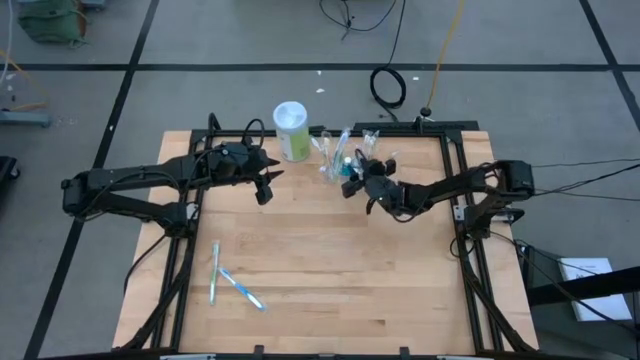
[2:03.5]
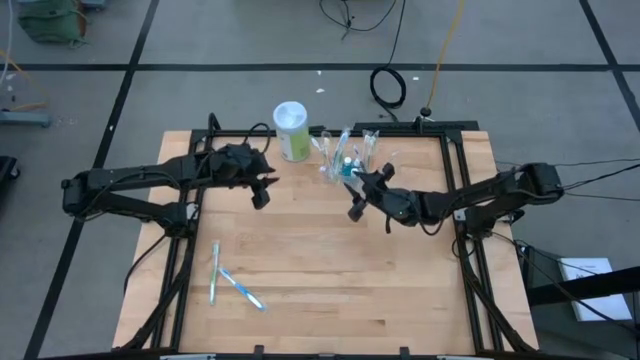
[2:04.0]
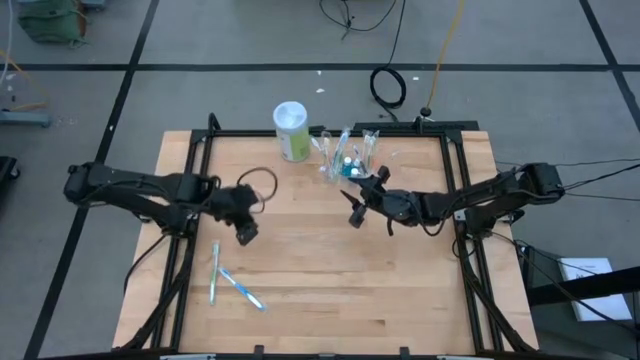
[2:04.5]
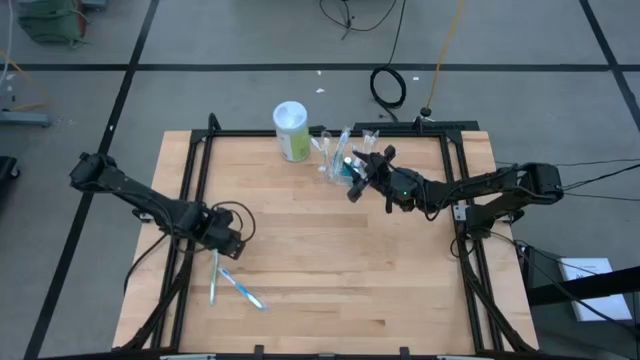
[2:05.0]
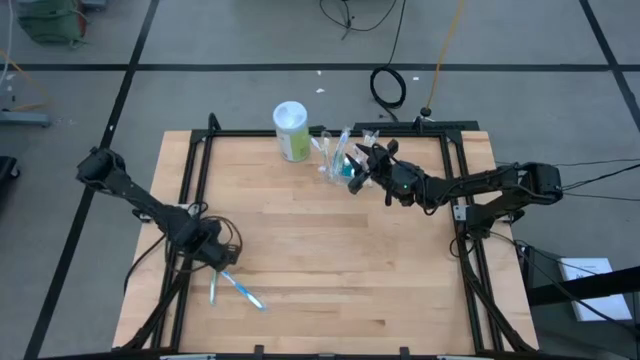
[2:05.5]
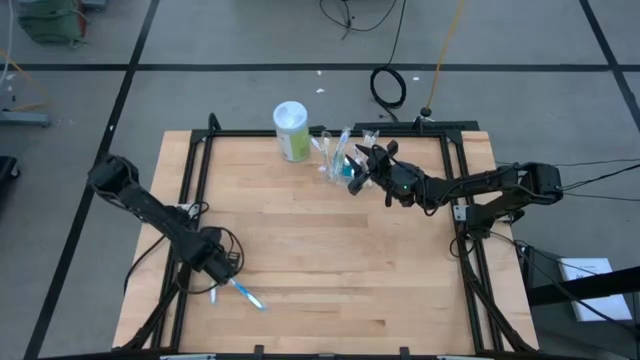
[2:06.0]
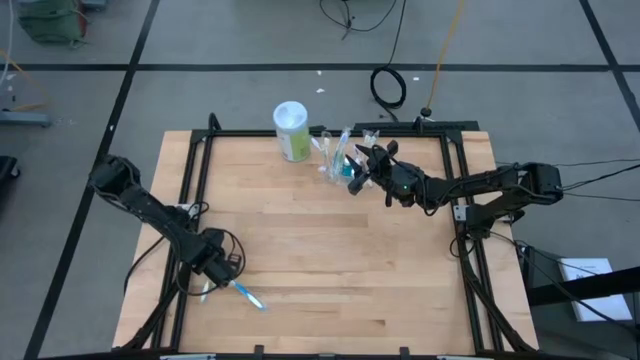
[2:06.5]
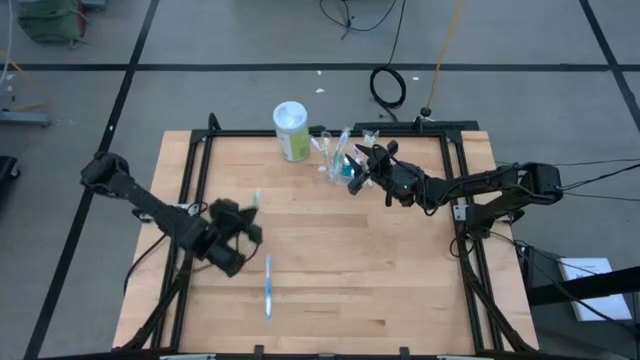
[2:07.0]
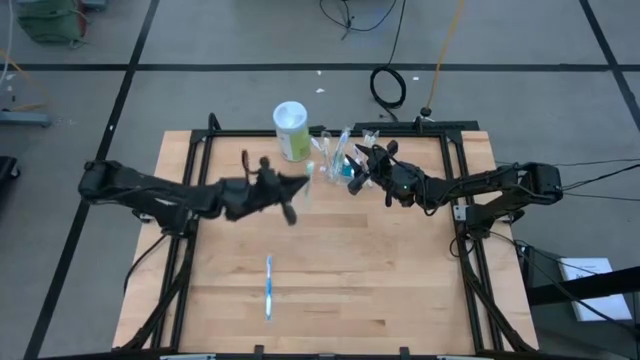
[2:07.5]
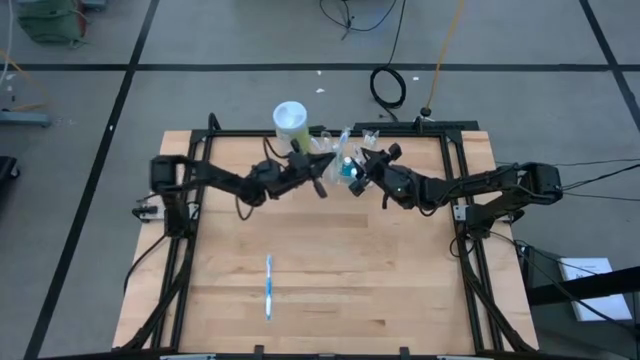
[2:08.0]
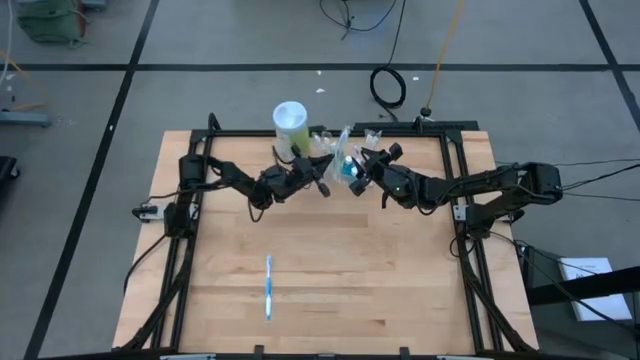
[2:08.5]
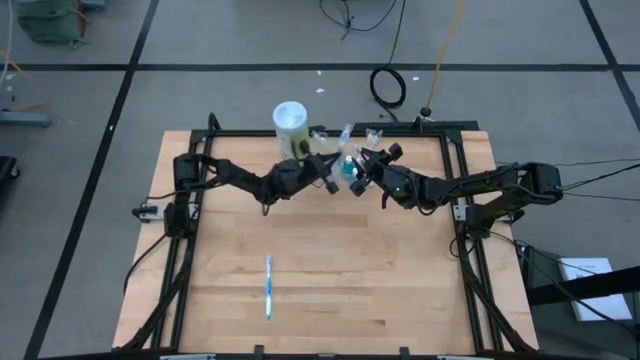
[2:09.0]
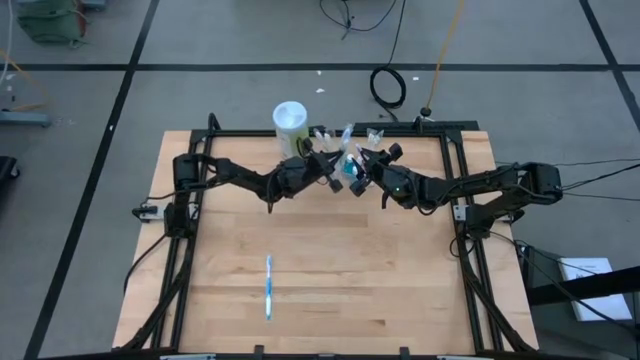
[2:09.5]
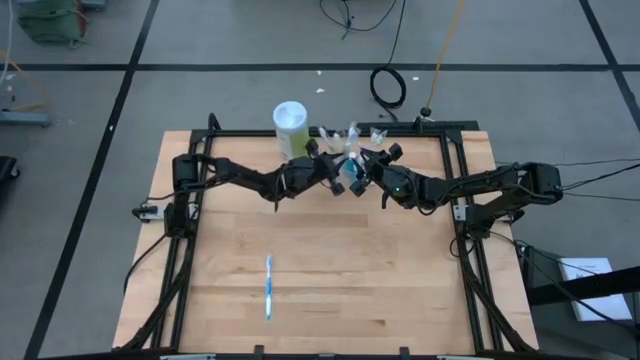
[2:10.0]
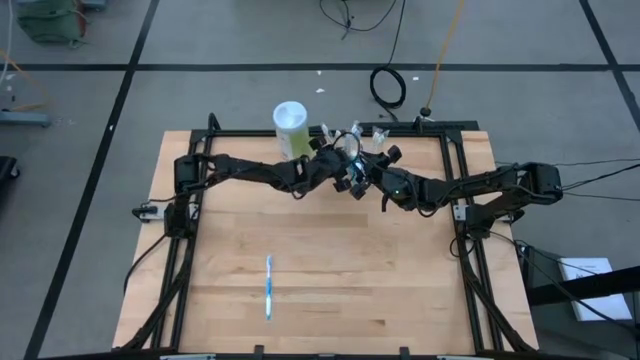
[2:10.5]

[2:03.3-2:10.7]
Task: Pick & Place toothbrushing station
Put the green toothbrush into the transparent organizer

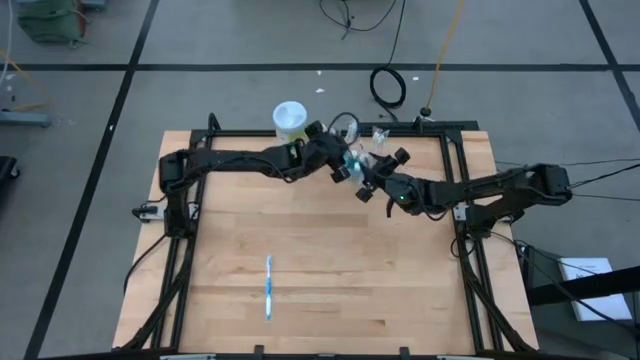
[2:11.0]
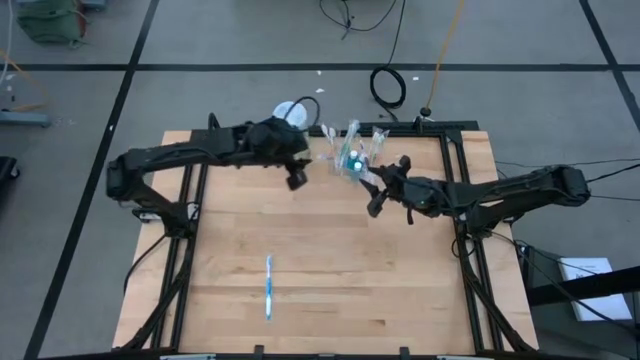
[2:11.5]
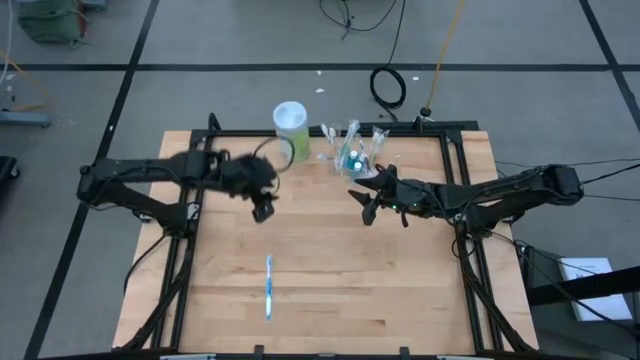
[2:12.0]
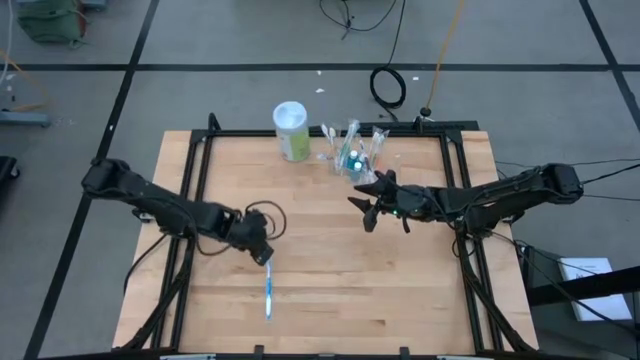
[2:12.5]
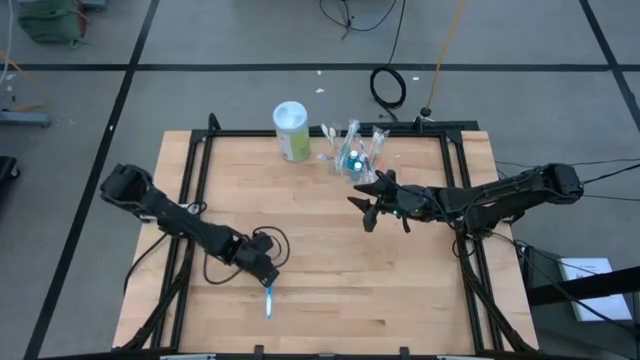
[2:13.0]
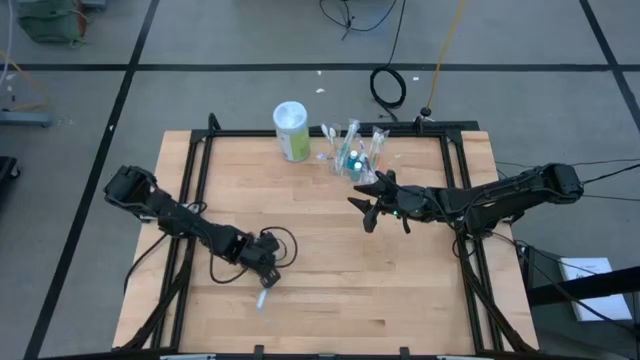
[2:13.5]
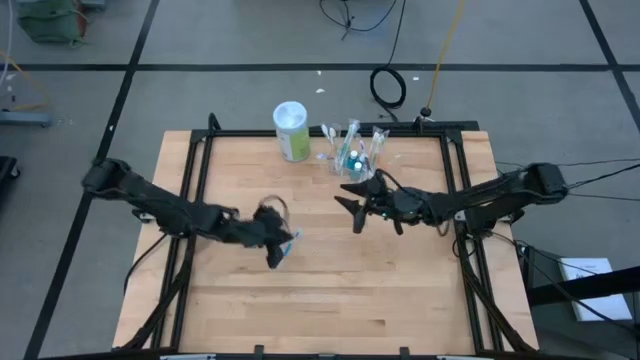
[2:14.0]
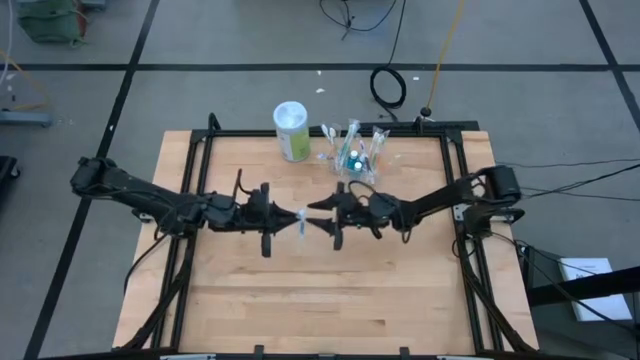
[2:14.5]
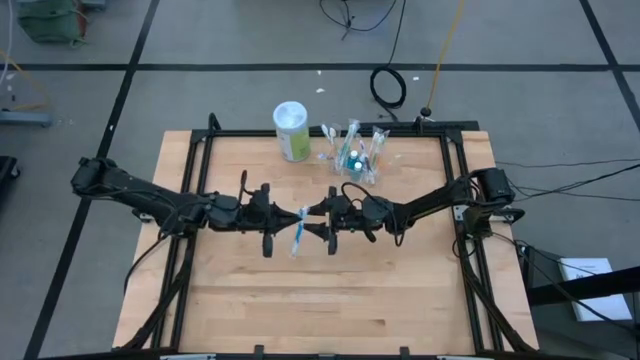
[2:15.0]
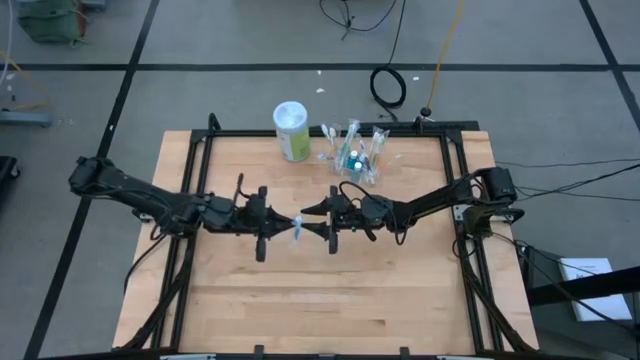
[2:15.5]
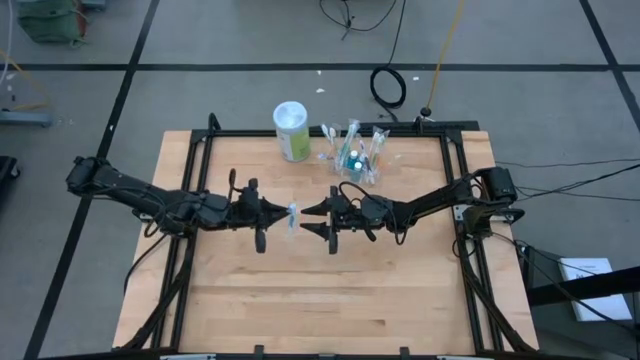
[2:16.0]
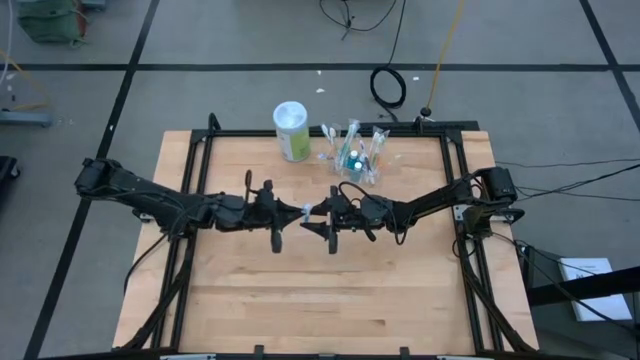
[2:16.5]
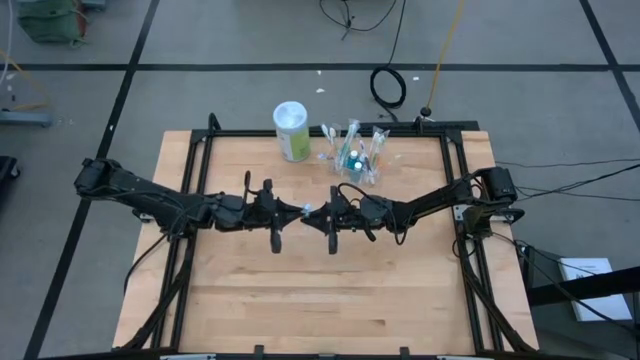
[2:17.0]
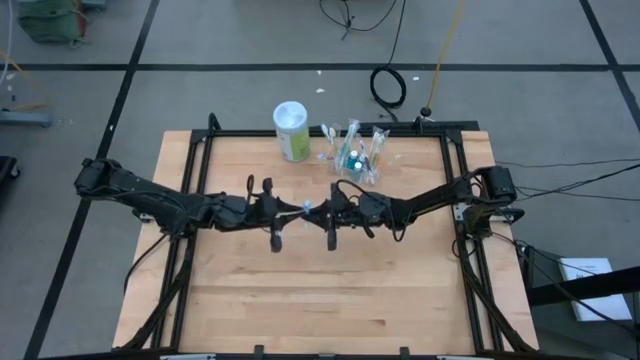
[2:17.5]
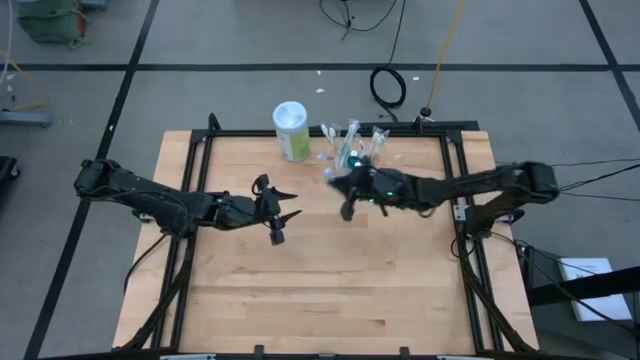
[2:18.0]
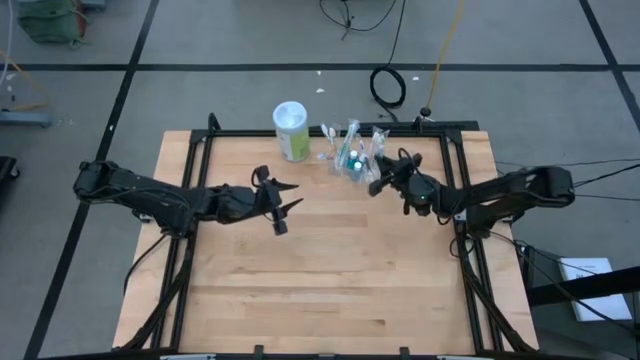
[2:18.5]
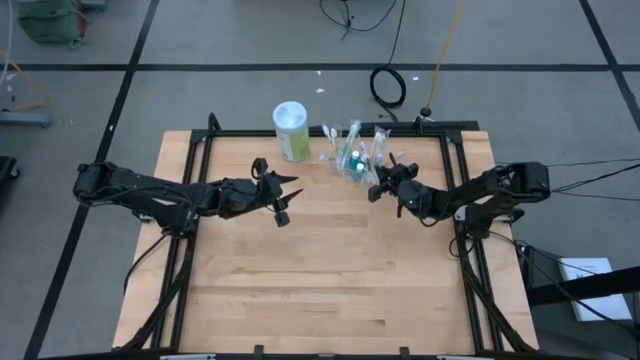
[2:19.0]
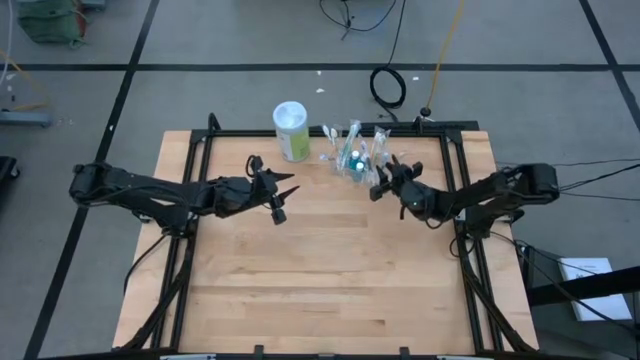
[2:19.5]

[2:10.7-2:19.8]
Put the blue toothbrush into the transparent organizer

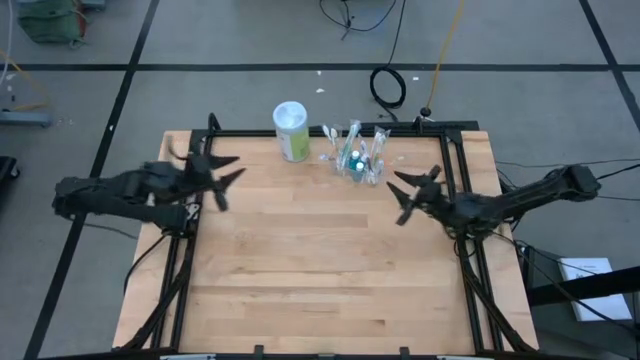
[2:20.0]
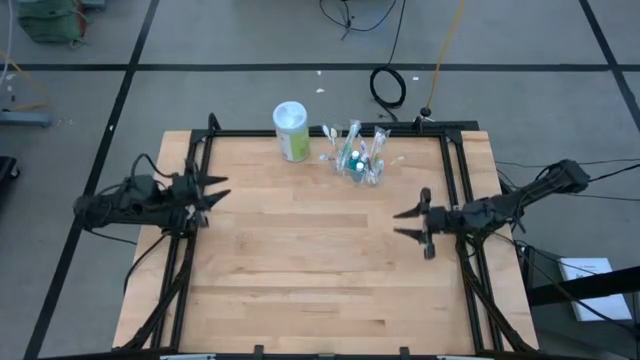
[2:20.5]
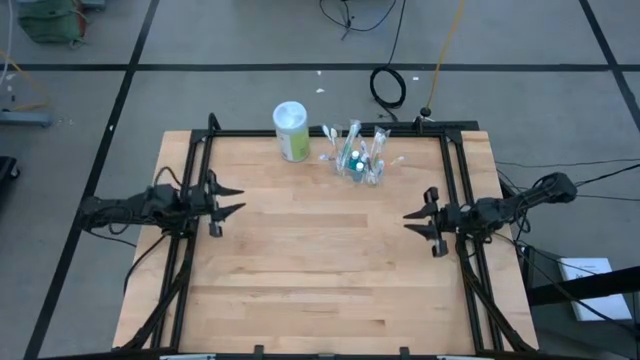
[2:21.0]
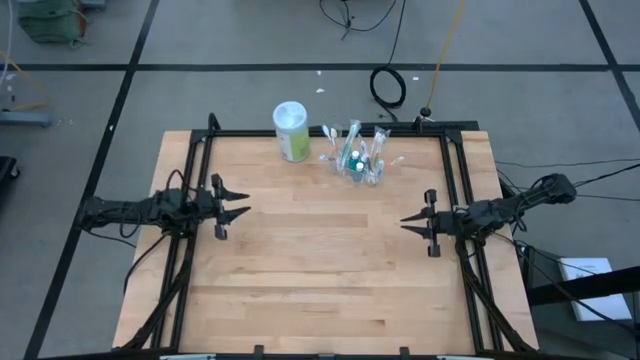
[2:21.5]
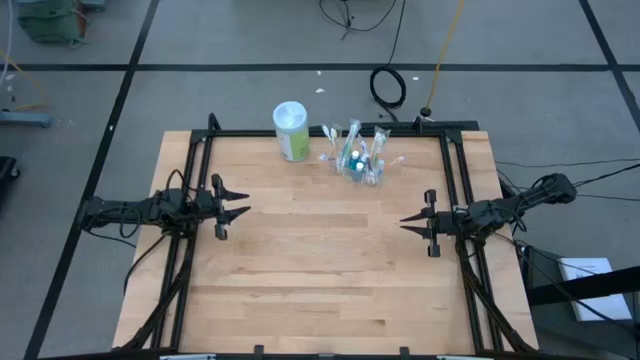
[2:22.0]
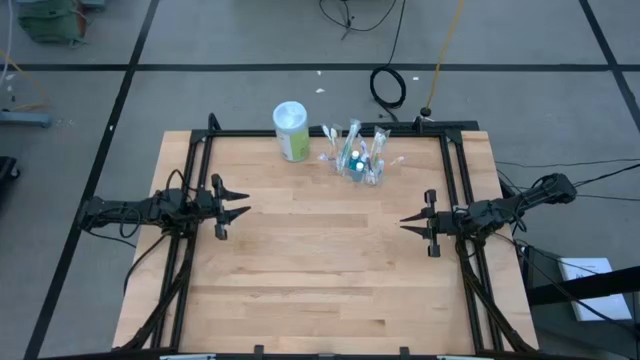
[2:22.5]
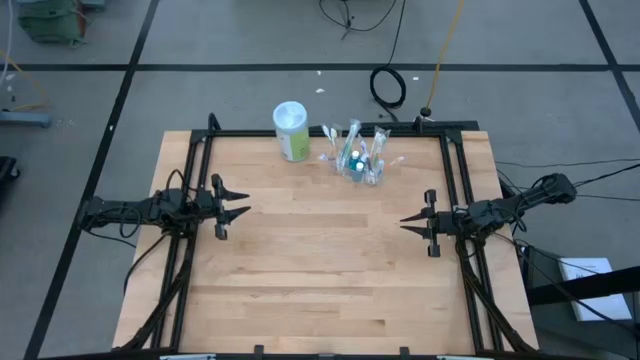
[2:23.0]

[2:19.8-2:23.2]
Return to Home Position

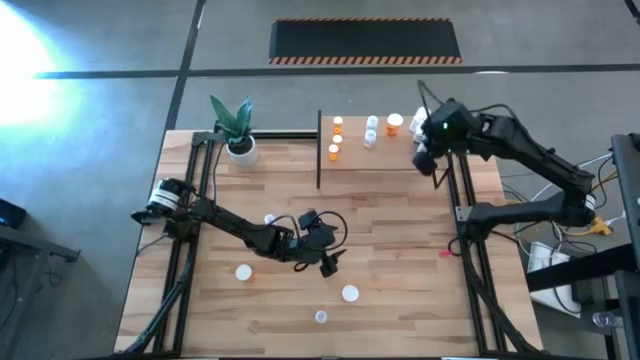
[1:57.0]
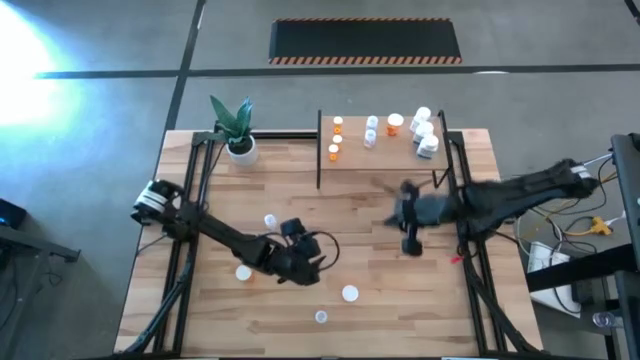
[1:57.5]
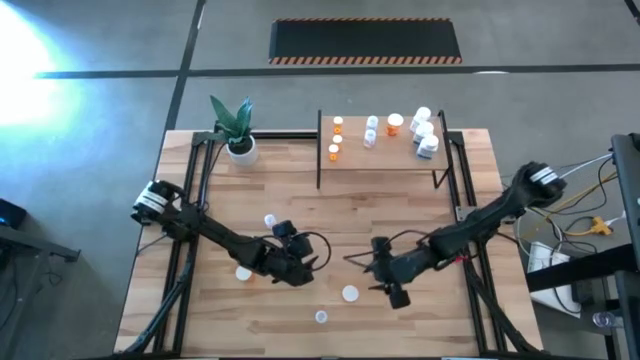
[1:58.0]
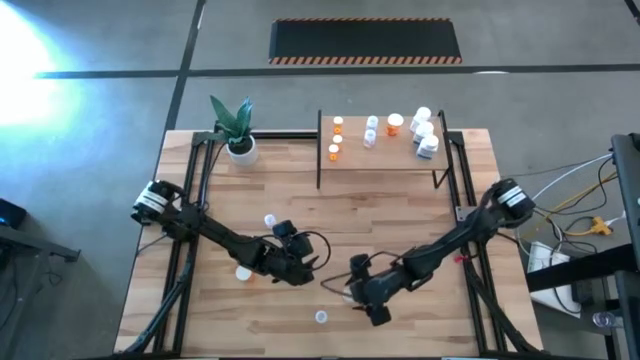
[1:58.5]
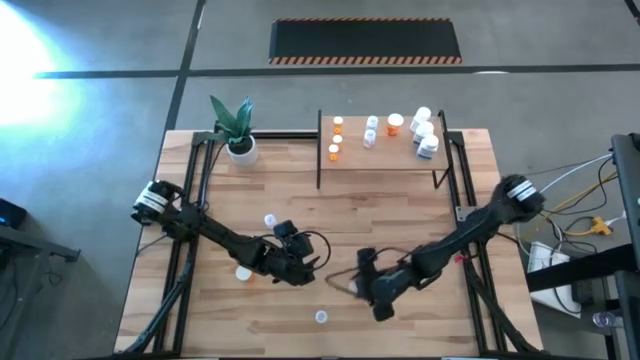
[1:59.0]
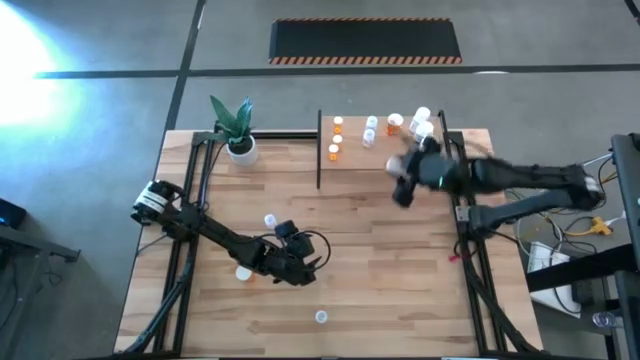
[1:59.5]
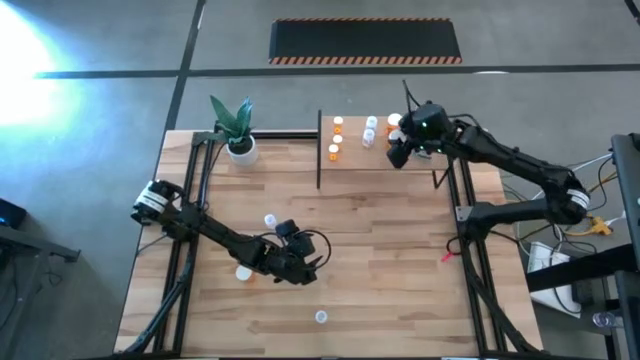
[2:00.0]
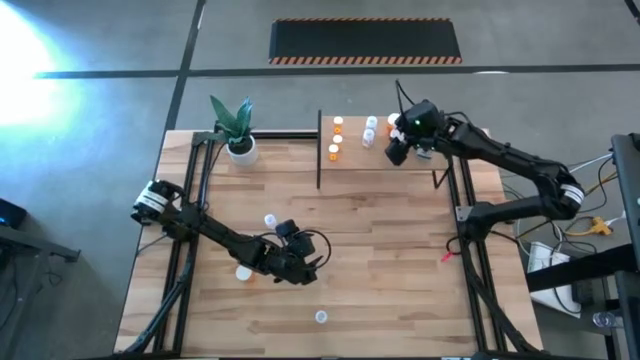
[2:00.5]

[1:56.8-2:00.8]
Task: Pick and place medicine bottles onto shelf by color
Put the big orange pill bottle on the shelf aligned with the other big orange pill bottle
